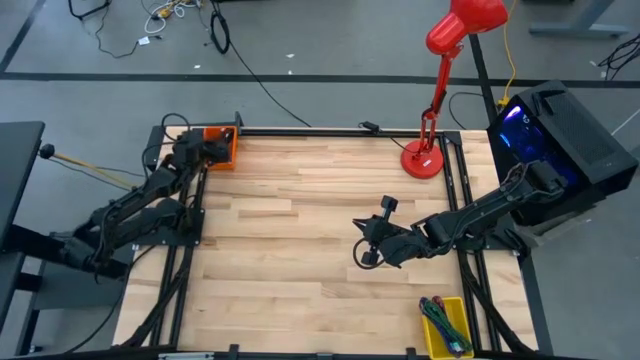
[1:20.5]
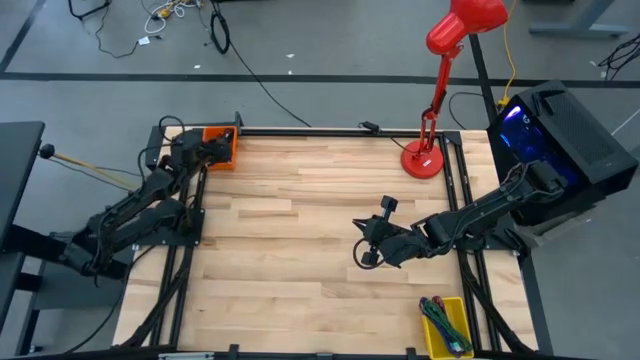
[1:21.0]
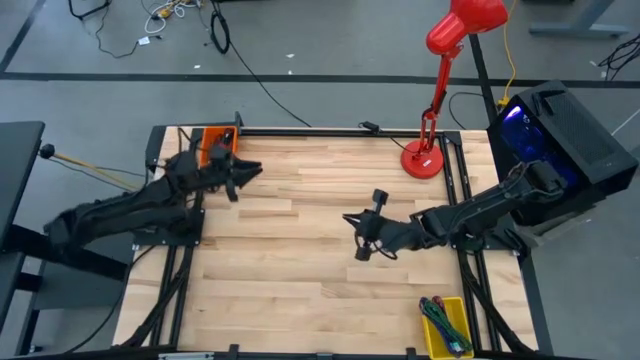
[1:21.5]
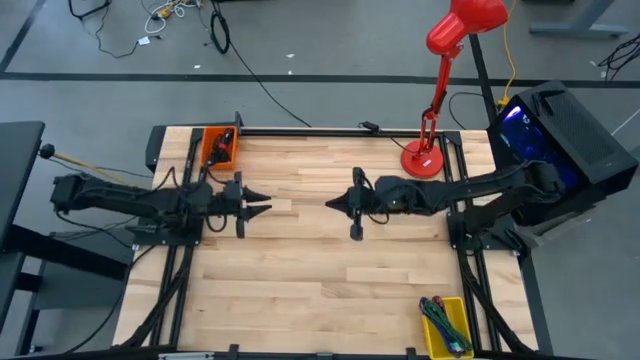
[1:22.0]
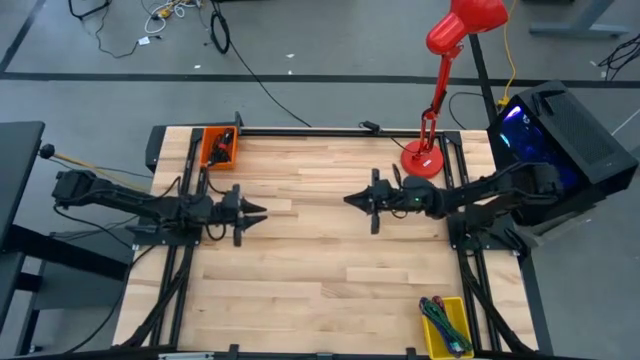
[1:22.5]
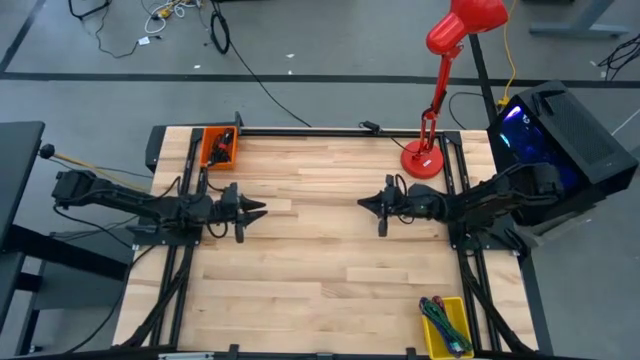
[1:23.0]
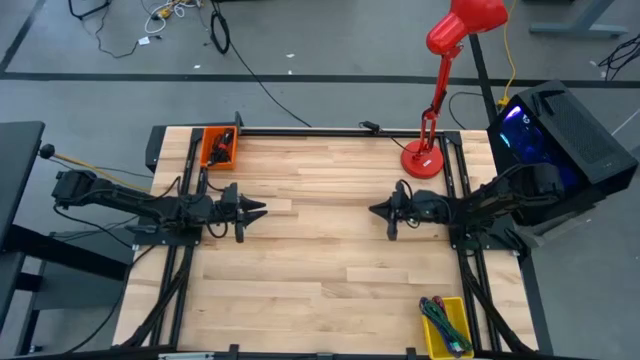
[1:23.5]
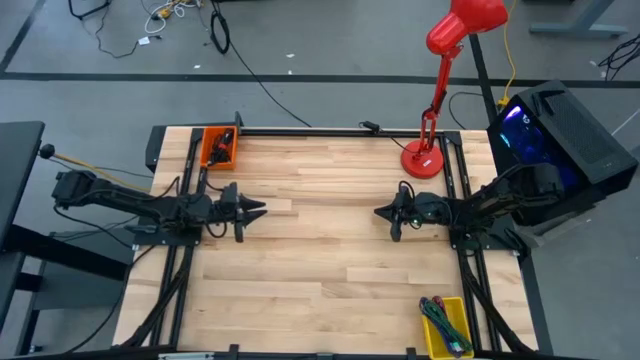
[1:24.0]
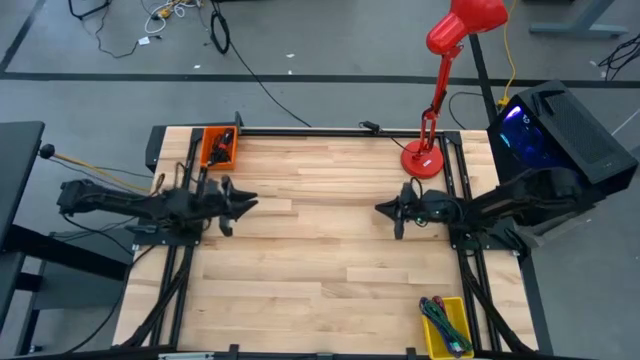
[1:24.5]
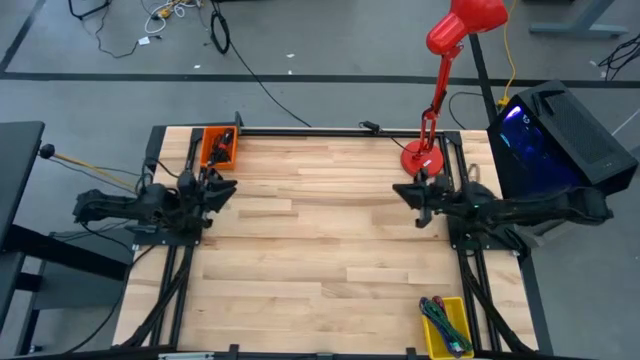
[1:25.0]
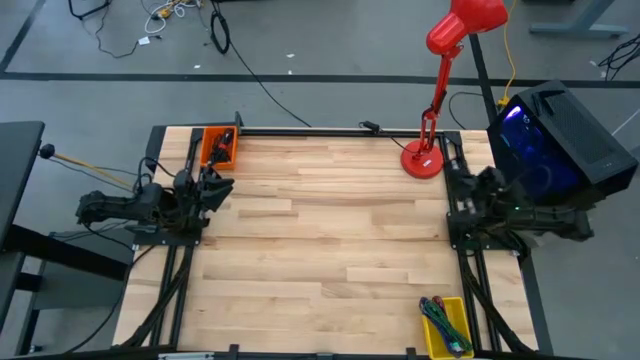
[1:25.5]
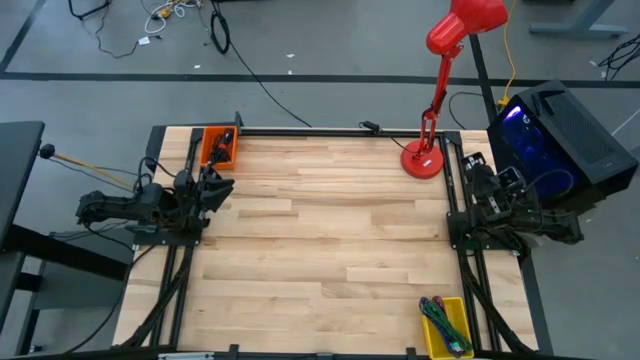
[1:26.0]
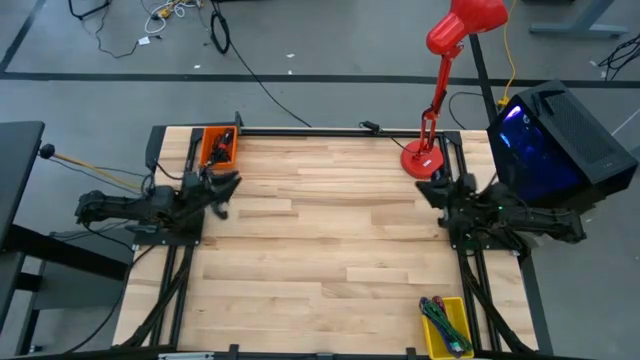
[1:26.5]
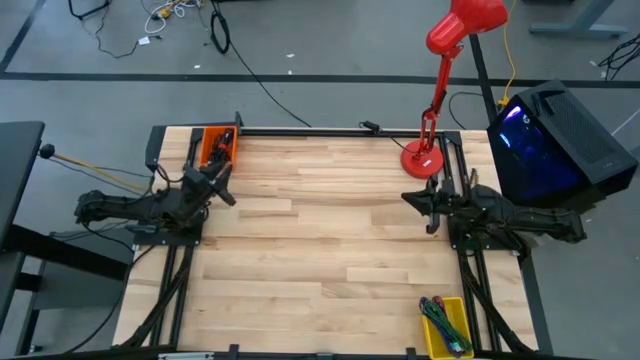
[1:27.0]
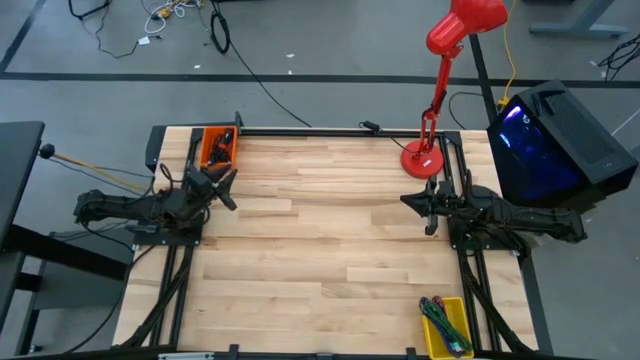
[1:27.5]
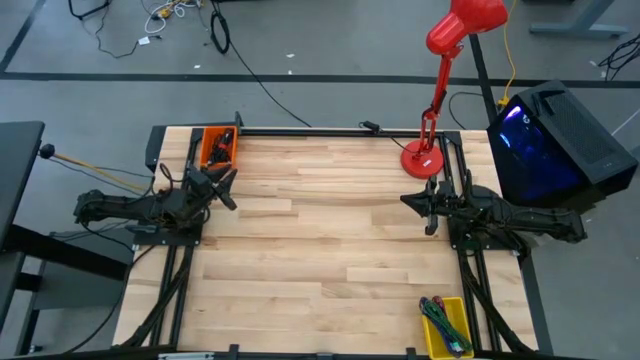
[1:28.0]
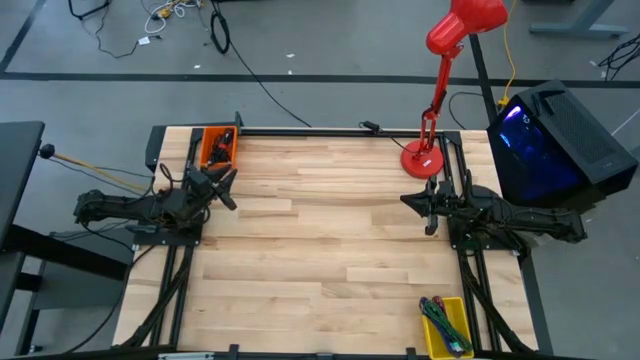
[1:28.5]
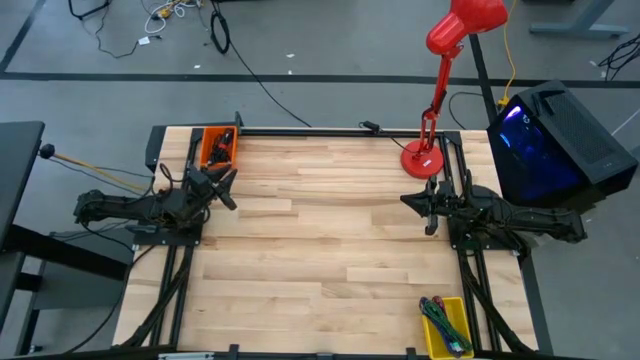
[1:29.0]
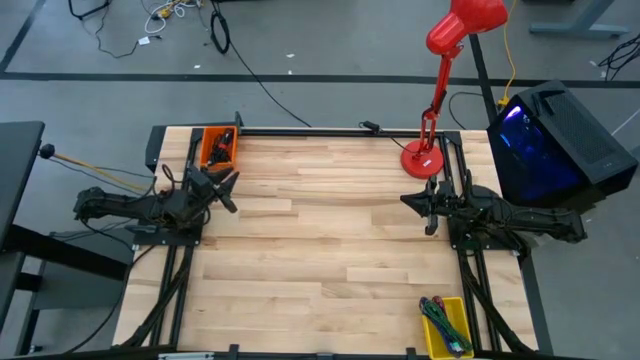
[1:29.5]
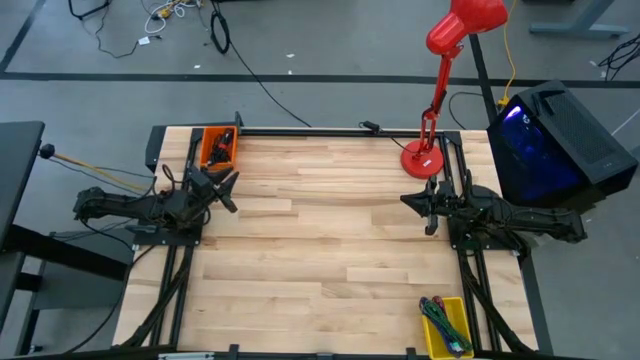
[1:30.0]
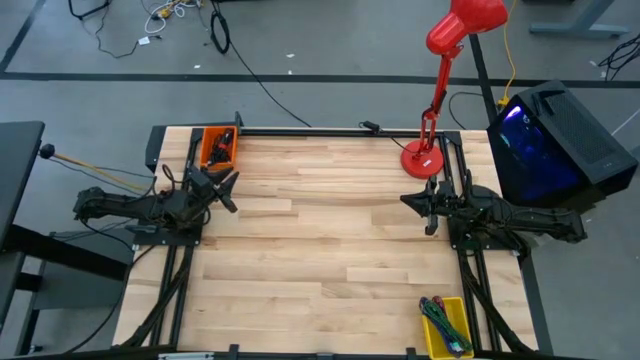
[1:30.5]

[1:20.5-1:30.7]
Task: Pick & Place USB Port
Return to home position

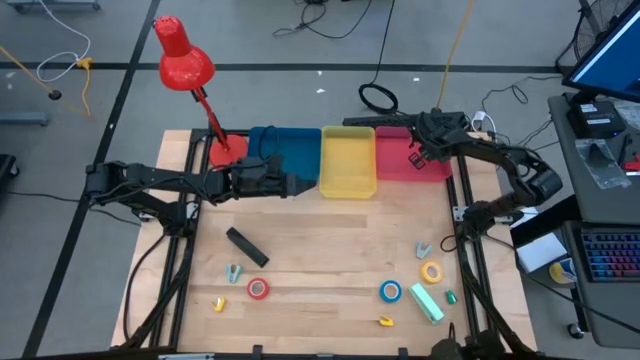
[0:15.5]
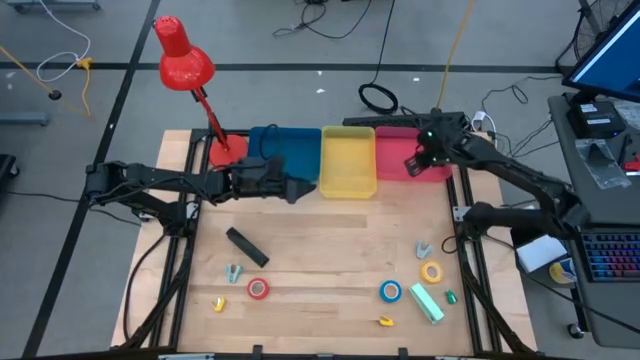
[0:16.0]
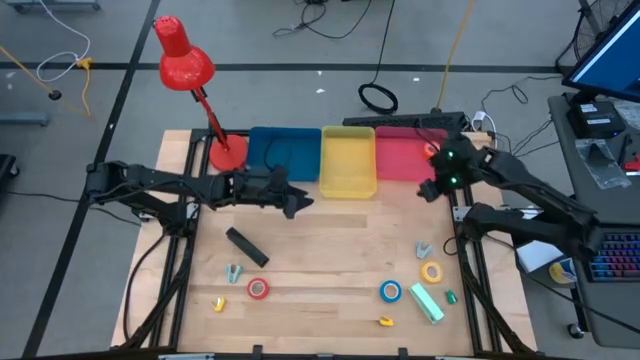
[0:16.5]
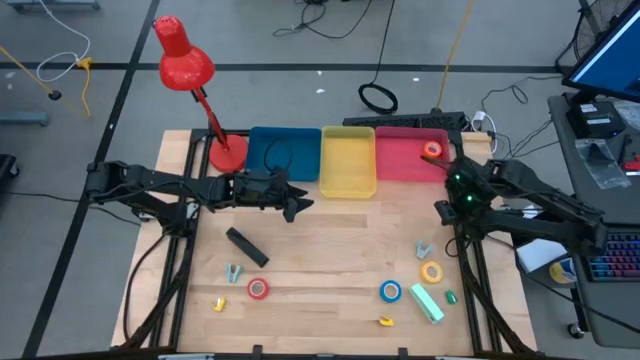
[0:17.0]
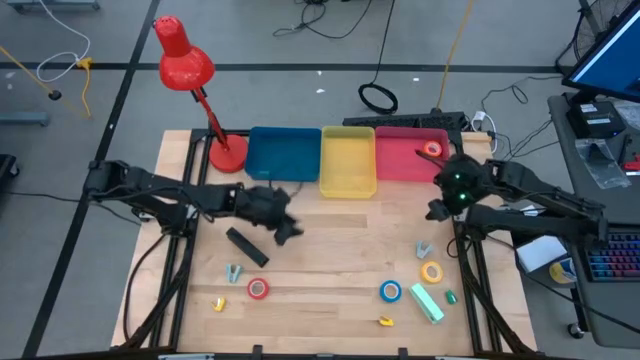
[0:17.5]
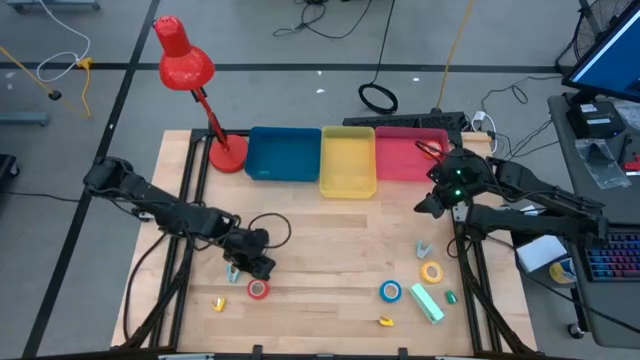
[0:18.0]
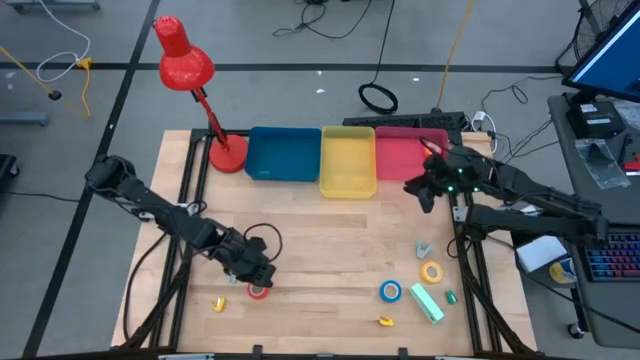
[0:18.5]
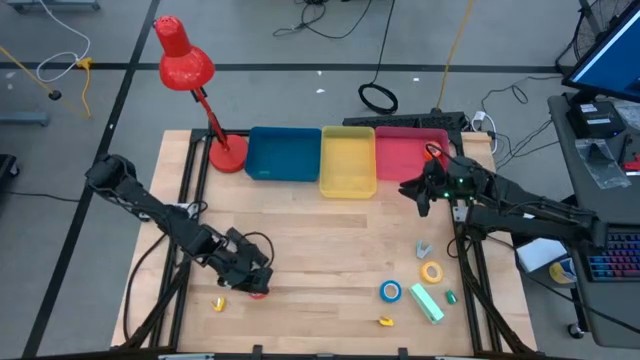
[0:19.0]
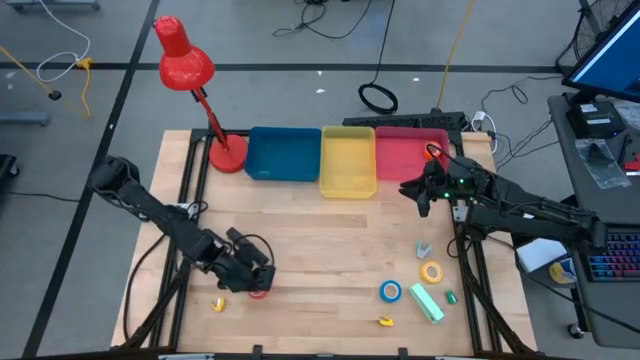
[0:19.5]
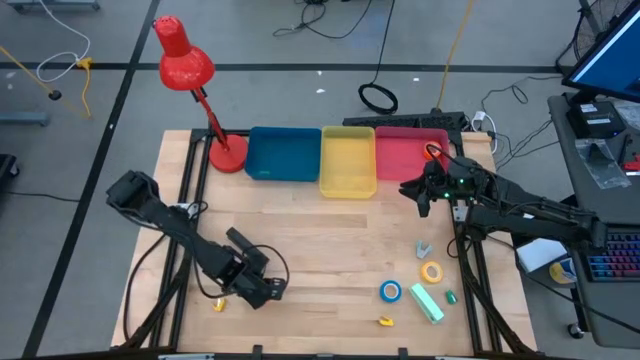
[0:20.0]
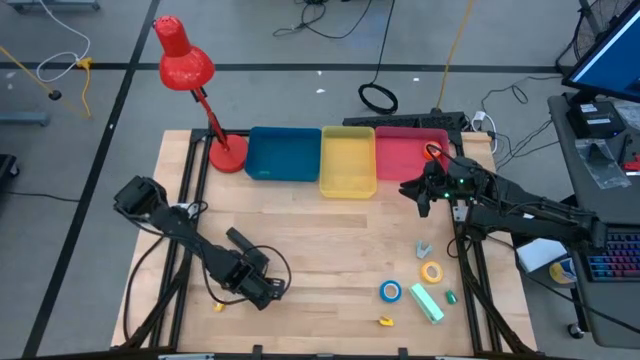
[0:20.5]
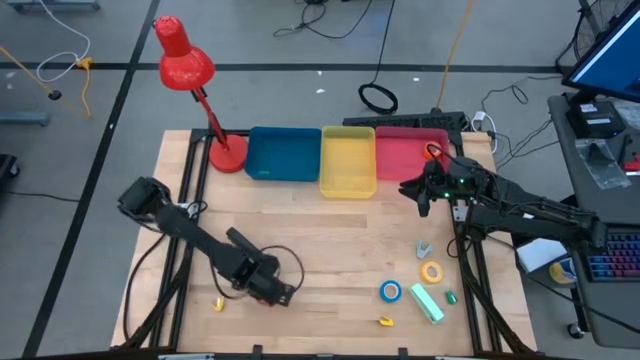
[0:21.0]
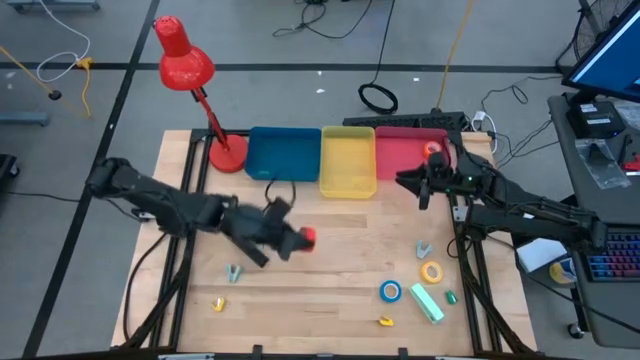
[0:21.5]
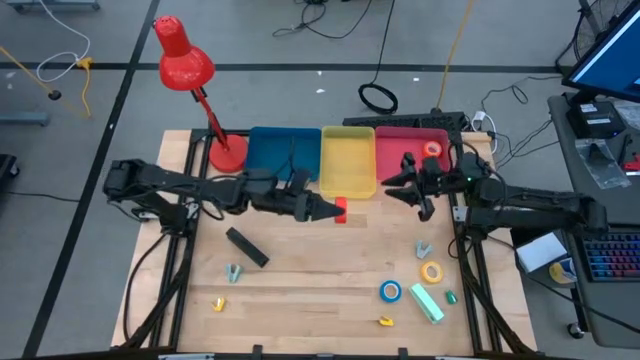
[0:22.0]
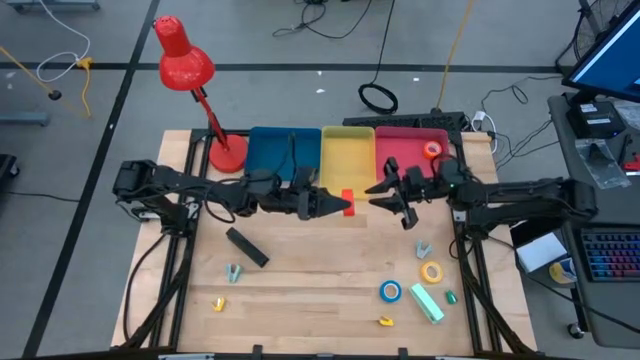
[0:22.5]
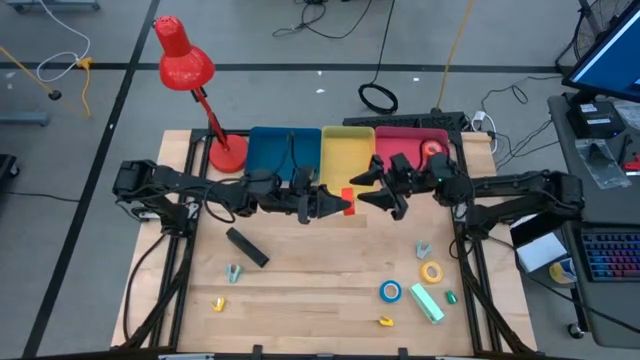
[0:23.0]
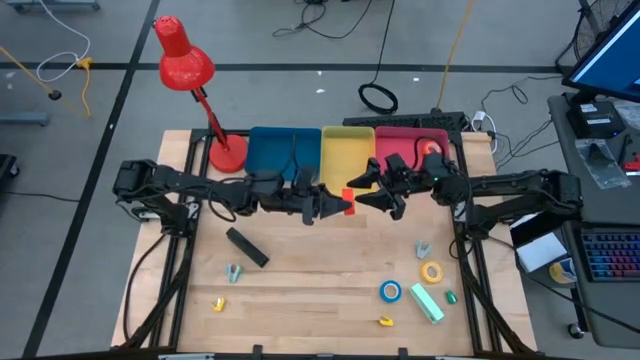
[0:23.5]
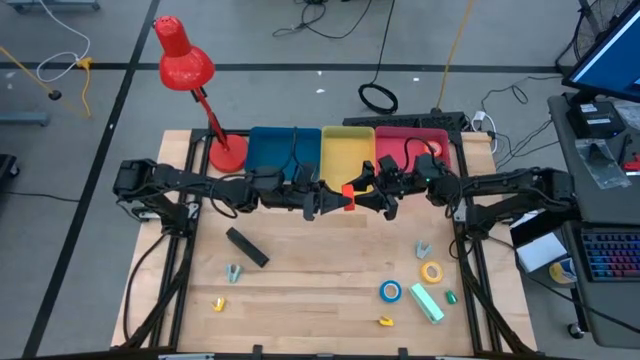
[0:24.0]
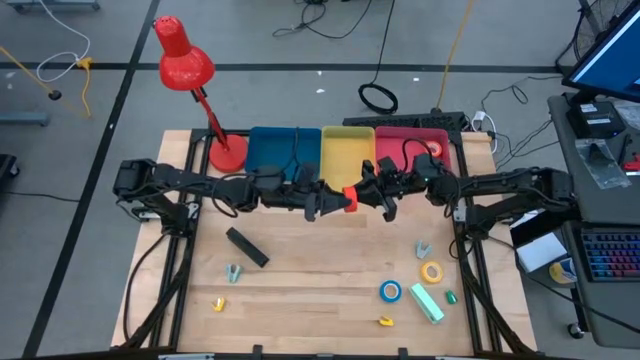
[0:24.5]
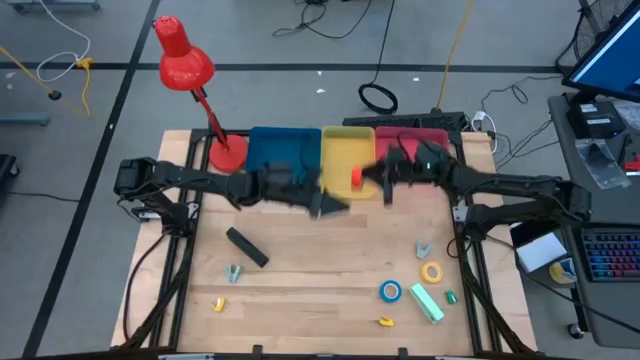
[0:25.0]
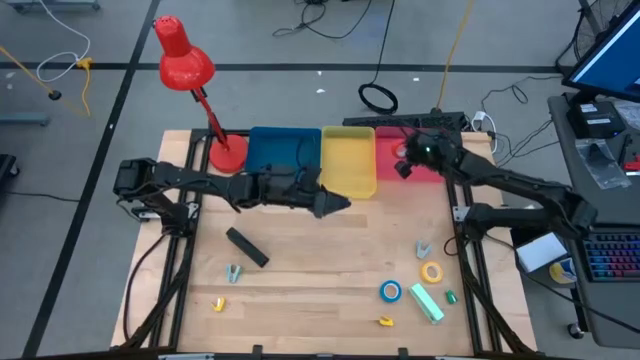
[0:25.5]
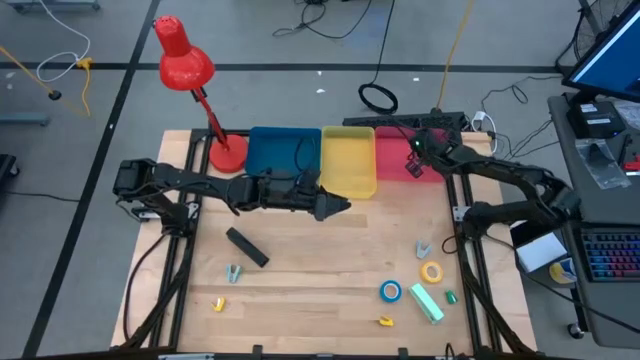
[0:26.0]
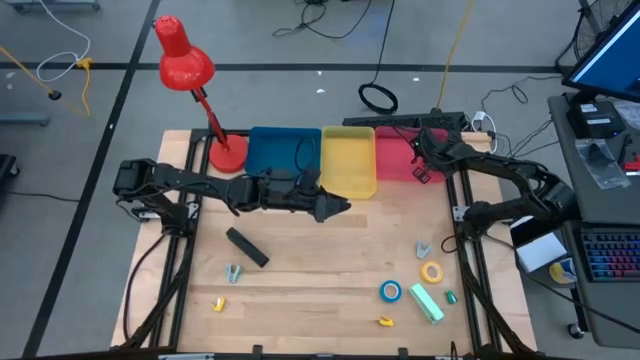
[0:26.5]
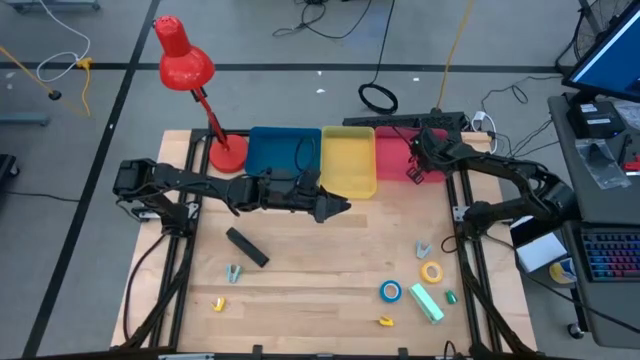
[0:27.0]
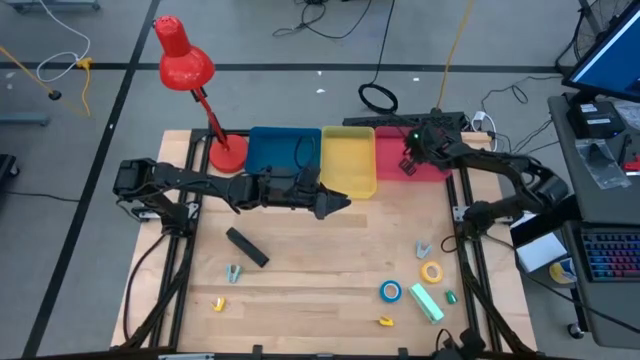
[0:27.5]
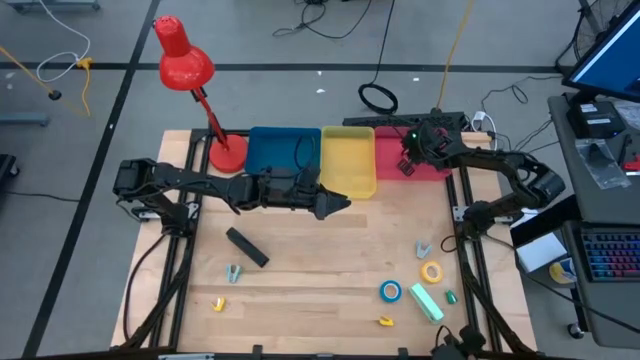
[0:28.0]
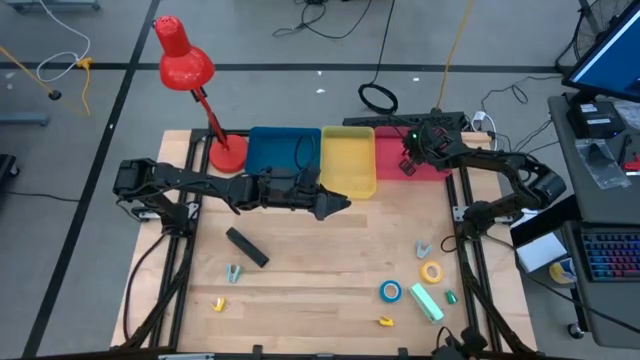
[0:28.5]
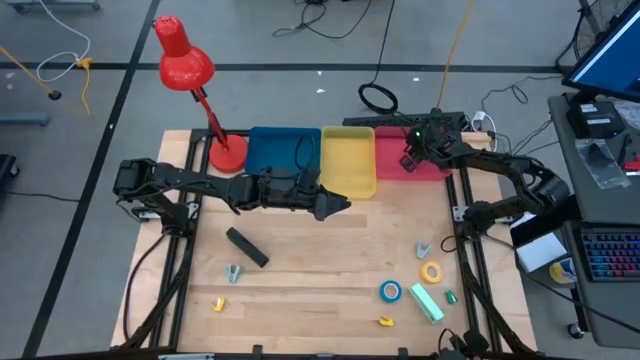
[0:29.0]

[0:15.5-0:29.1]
Task: Pick and place Stapler, Stapler remover, tape
Put the red tape into the red bin
